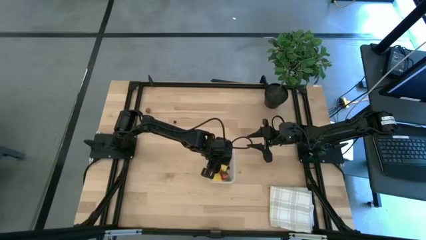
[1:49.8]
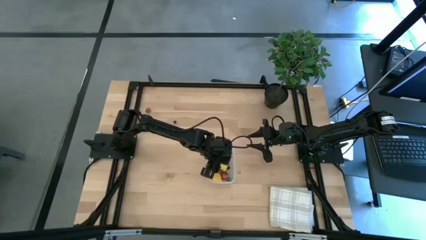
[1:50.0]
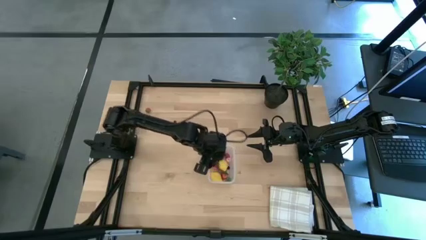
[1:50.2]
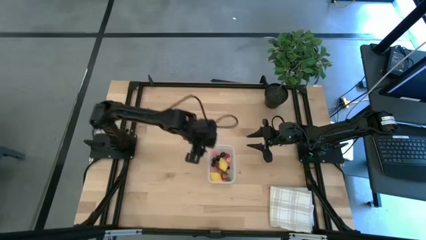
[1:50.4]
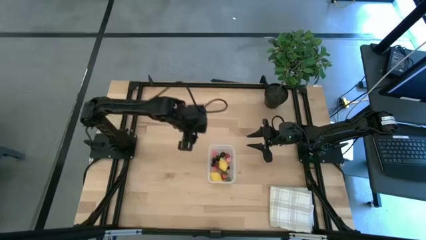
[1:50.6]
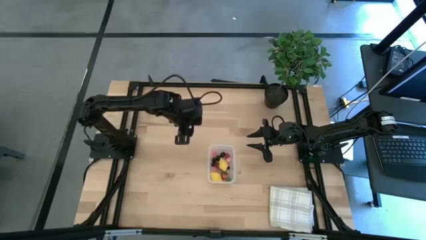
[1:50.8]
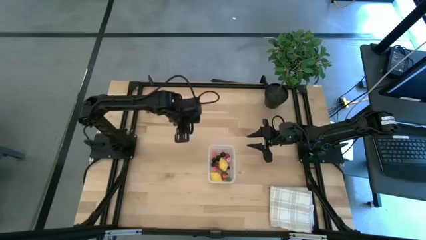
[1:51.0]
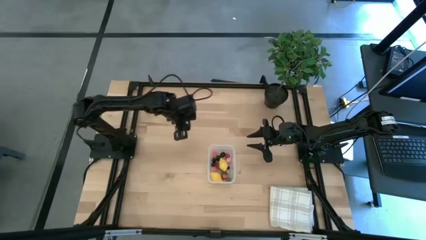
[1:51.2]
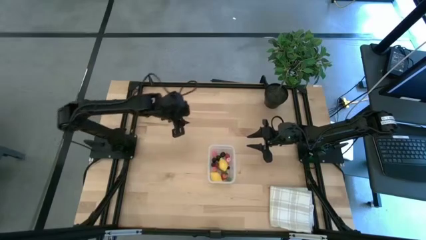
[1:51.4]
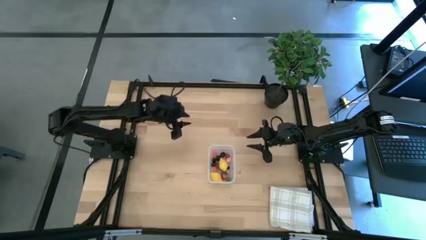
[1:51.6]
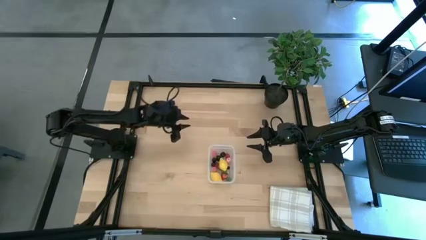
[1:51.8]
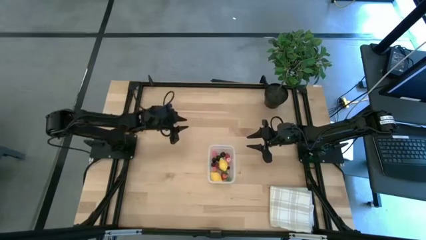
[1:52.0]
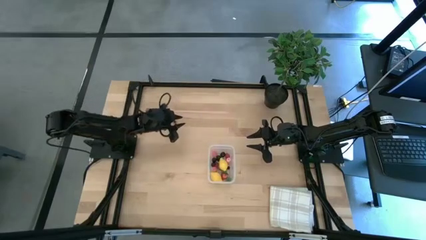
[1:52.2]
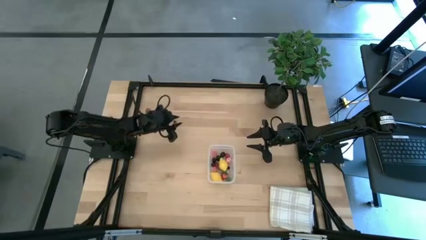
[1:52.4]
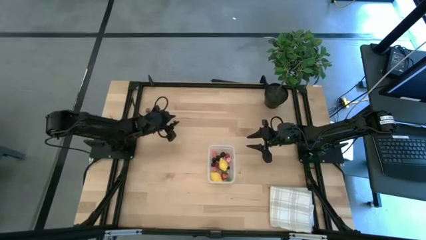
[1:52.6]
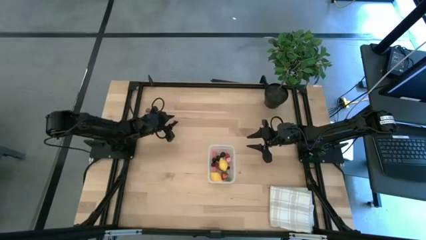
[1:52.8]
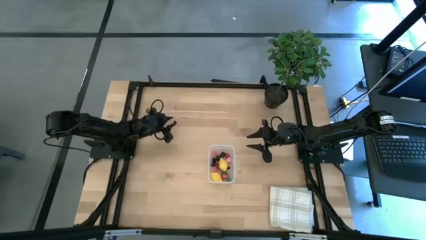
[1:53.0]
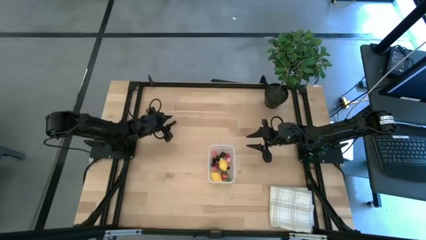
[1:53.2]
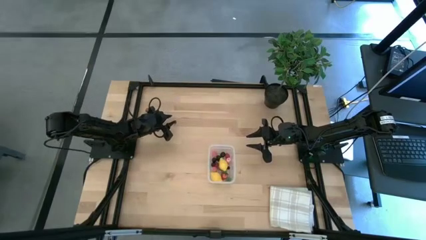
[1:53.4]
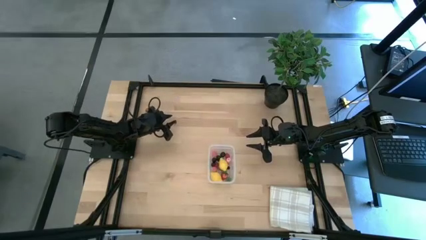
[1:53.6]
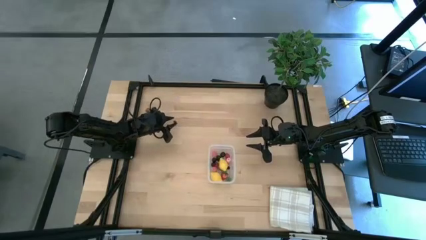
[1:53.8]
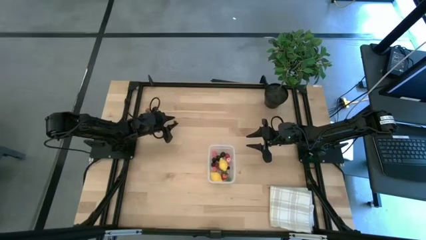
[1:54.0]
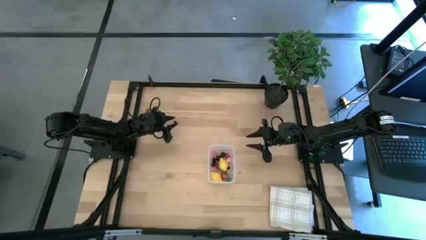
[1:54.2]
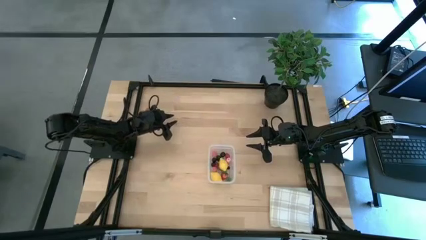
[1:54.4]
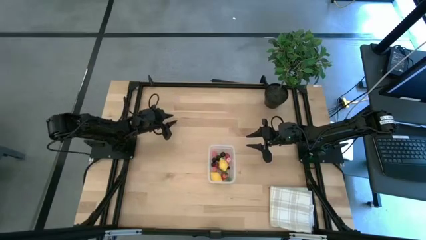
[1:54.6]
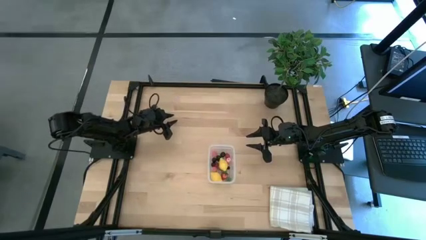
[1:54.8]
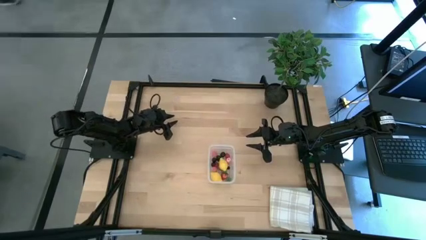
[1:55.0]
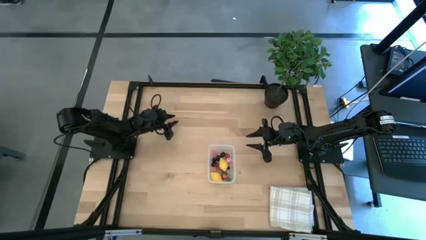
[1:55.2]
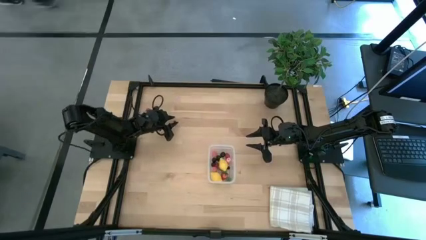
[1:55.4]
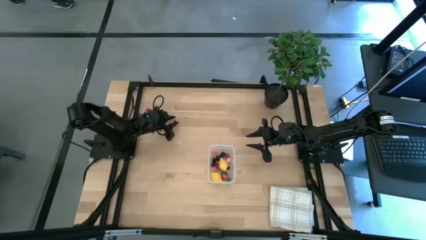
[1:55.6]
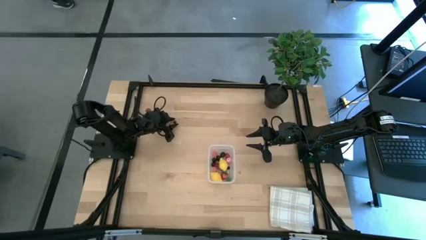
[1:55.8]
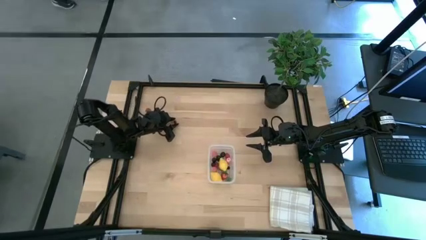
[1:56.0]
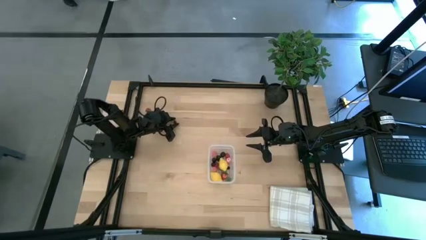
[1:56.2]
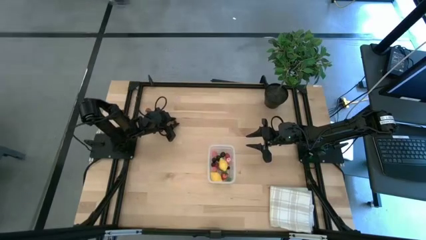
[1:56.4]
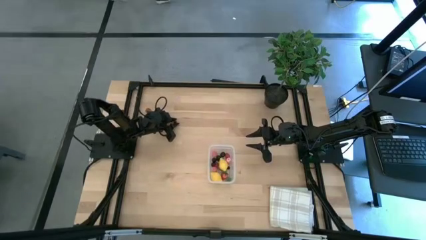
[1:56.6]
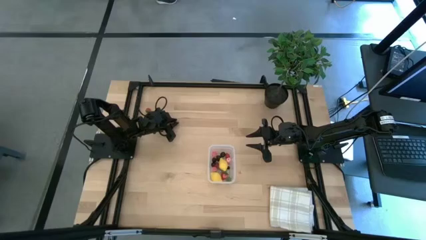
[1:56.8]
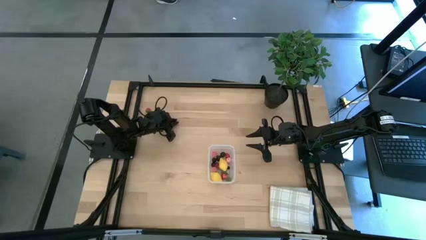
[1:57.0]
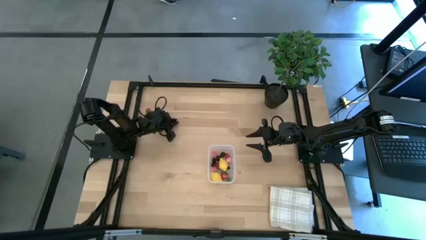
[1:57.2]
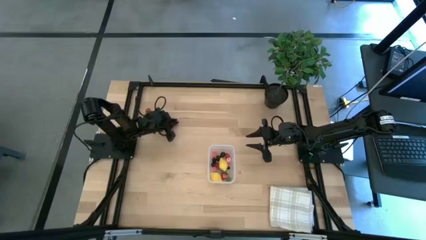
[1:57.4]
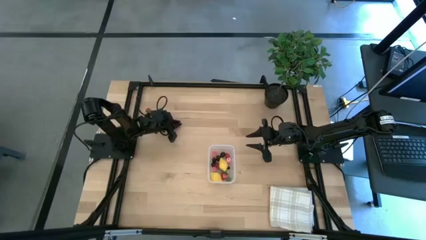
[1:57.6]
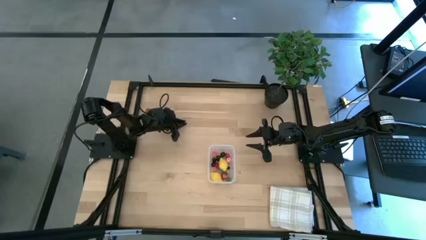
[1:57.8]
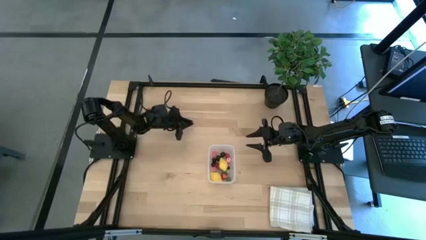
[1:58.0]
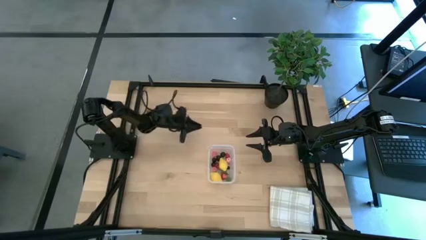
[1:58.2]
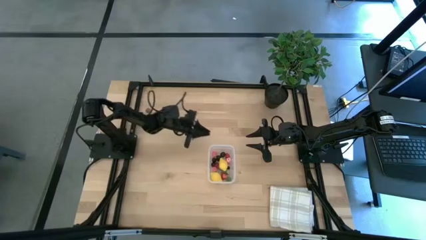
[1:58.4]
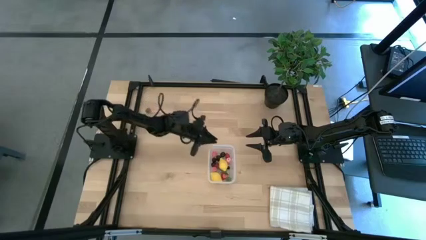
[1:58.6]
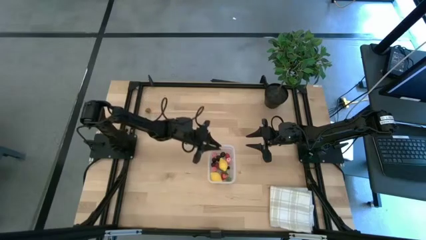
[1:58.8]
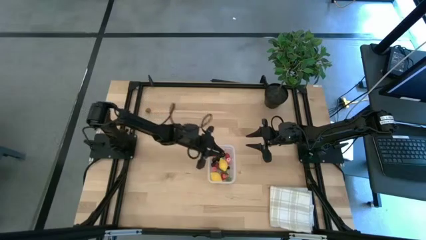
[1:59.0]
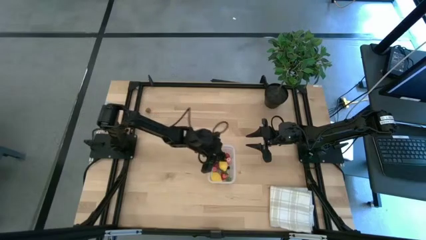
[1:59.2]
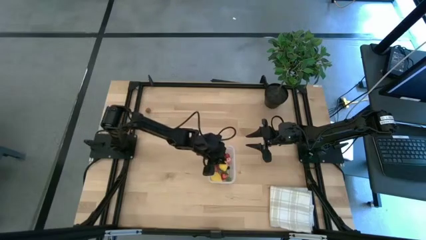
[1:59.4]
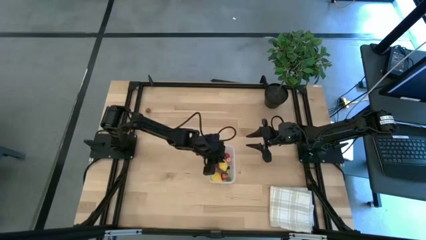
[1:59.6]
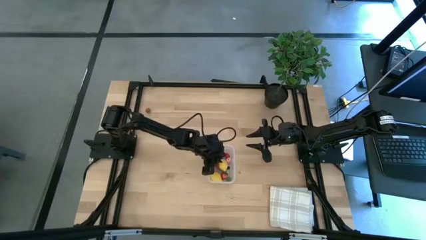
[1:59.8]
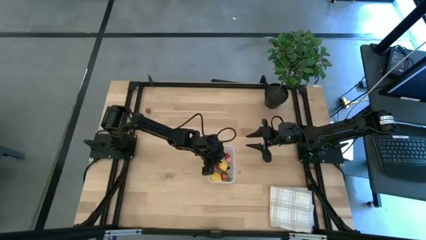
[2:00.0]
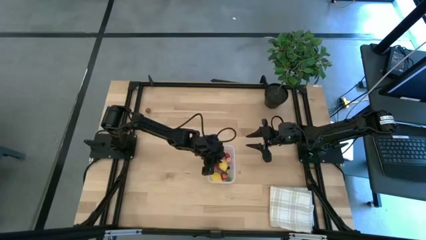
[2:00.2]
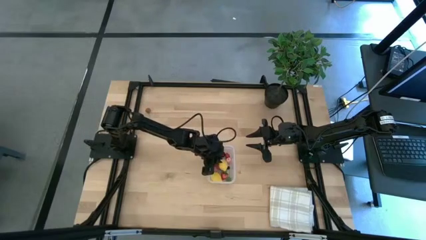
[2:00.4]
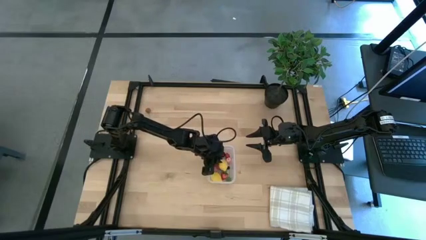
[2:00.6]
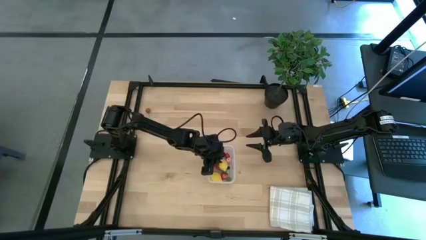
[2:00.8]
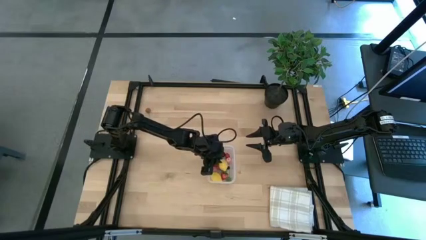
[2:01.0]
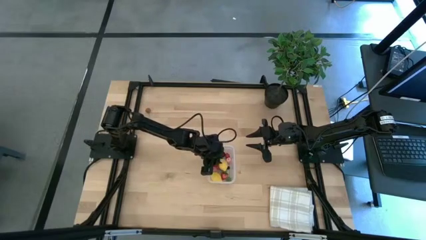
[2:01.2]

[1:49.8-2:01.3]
Task: Pick and placing Produce into tupperware
Put the blueberry into the transparent bin

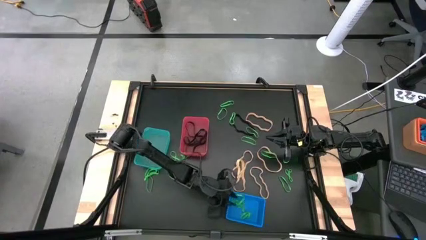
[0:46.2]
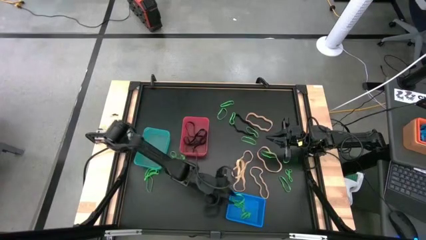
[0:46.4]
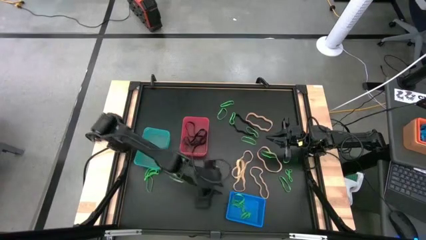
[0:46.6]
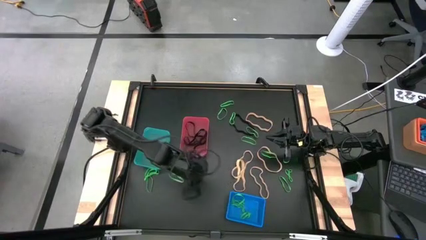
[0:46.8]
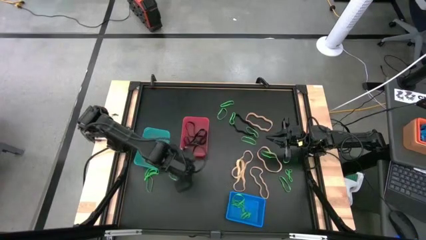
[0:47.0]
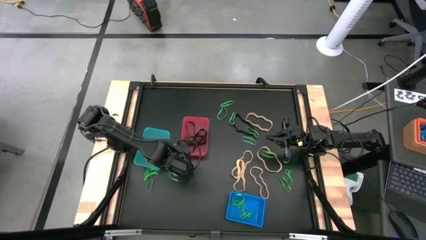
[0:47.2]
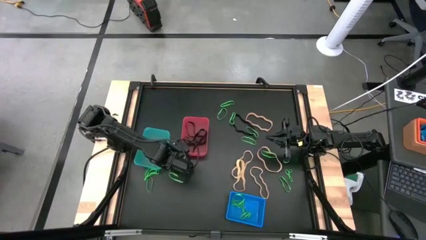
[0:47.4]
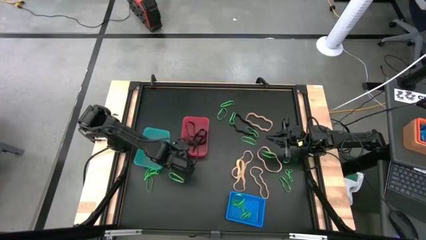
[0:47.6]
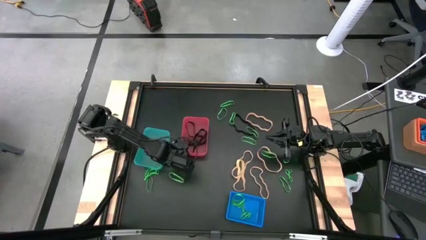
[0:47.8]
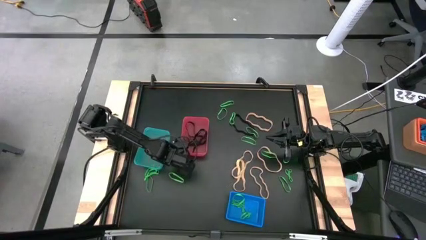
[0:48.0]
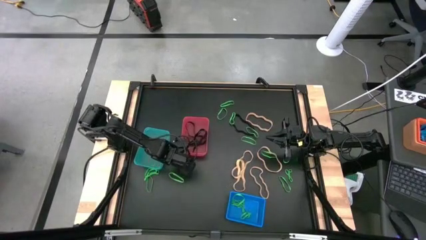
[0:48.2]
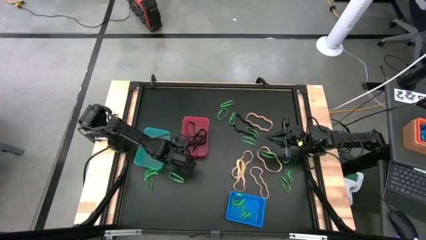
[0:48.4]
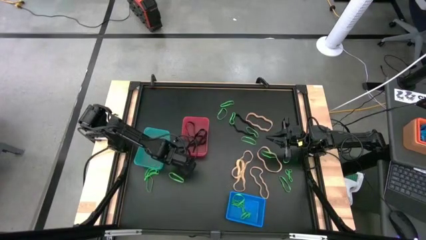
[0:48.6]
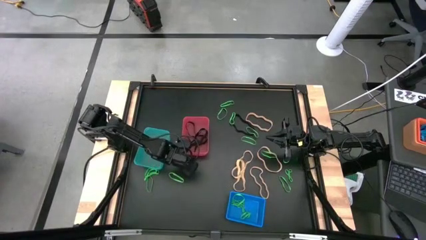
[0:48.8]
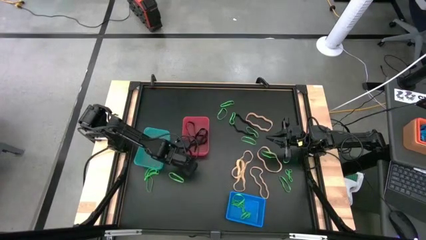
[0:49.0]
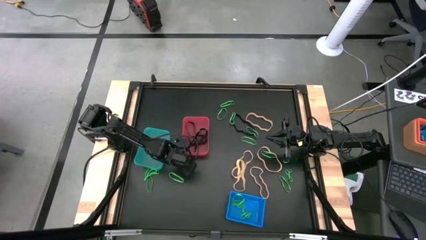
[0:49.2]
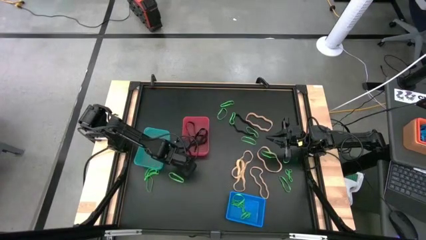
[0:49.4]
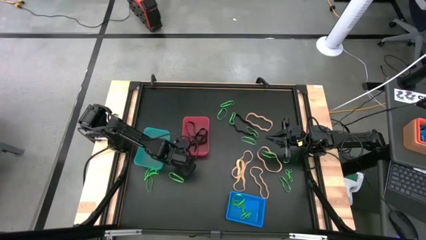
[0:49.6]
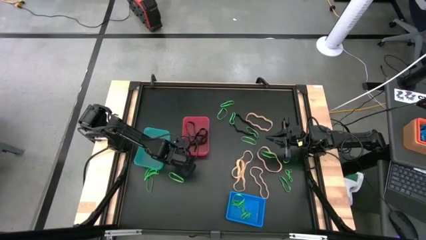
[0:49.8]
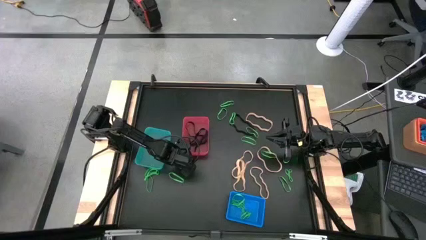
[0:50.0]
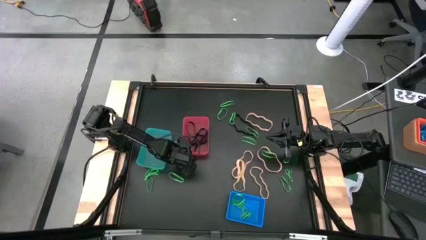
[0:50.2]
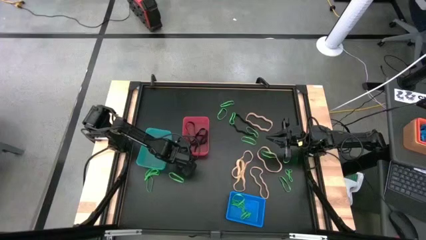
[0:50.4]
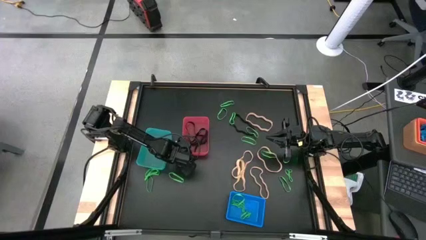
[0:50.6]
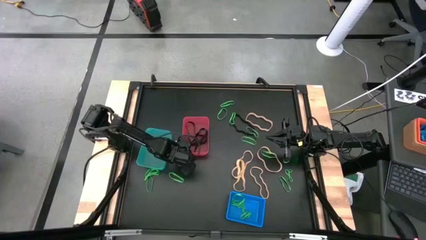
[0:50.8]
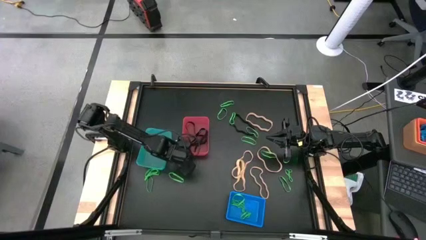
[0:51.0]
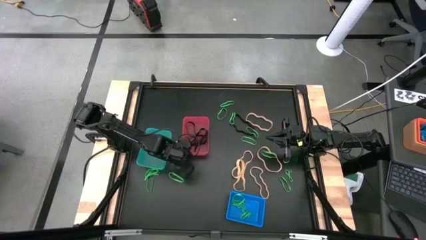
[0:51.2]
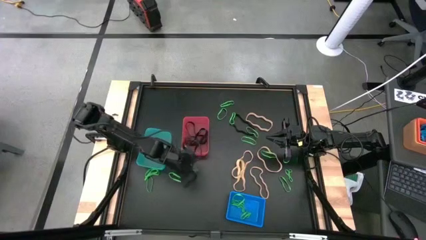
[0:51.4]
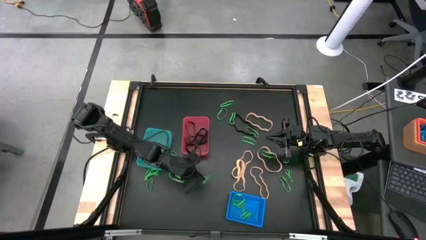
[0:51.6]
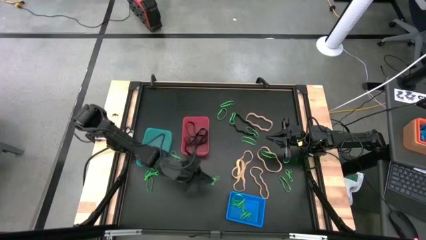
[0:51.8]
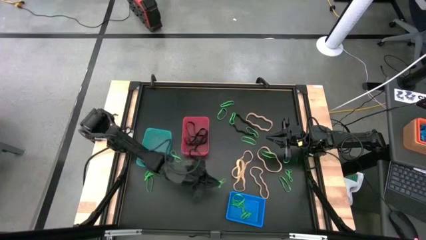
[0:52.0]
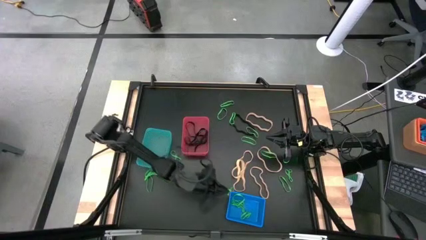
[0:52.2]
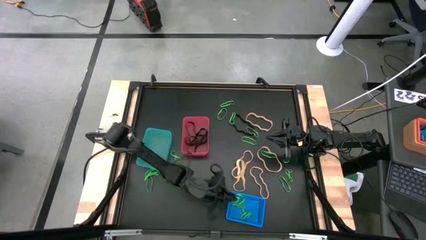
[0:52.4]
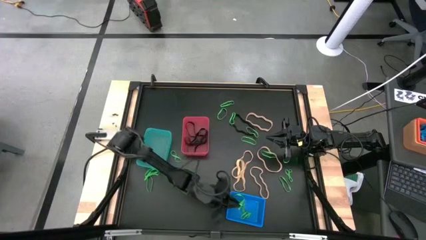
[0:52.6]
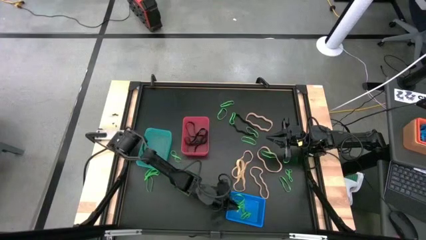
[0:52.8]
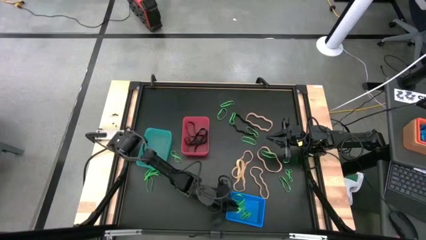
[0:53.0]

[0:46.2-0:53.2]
Task: Sort rubber bands into baskets
Put the green rubber band into the blue bin
